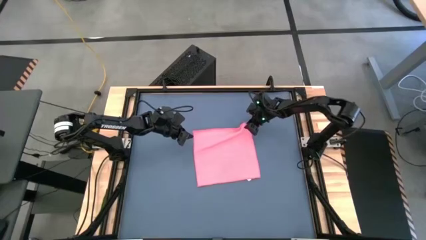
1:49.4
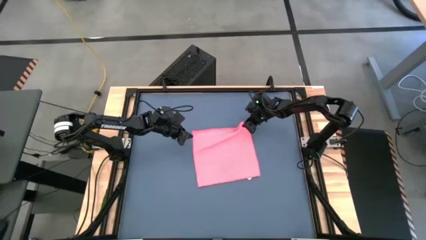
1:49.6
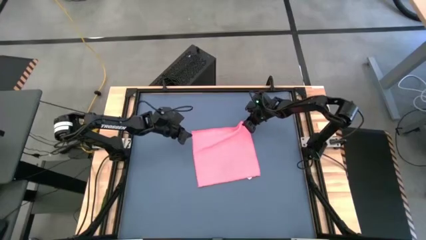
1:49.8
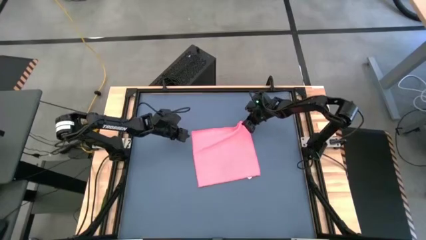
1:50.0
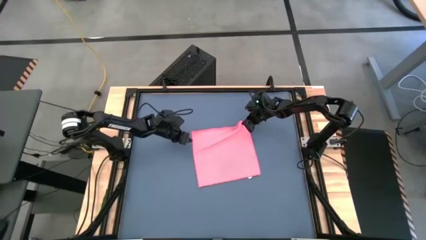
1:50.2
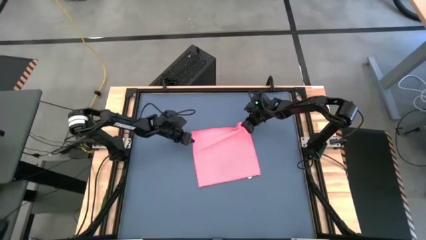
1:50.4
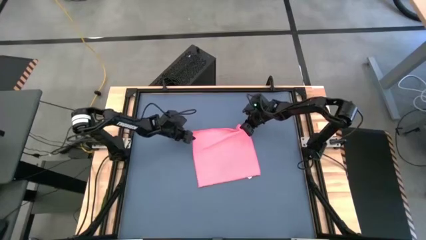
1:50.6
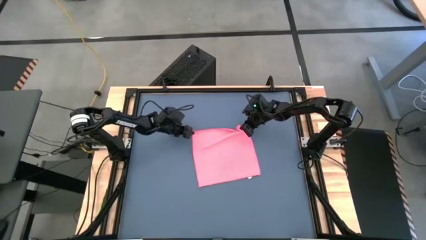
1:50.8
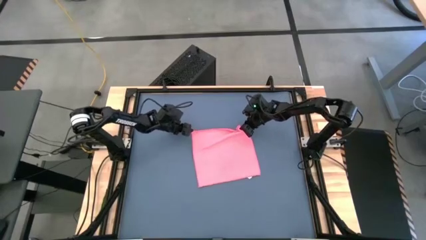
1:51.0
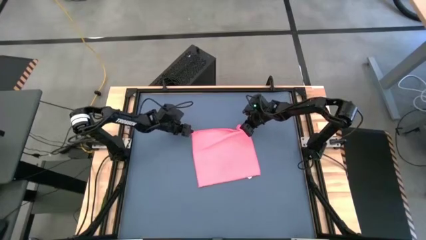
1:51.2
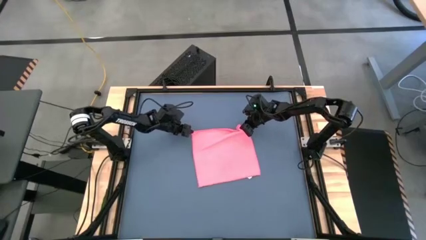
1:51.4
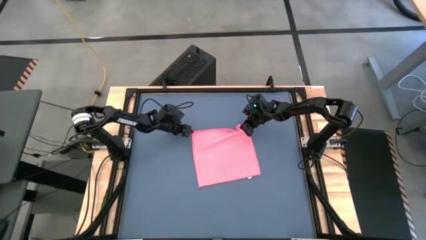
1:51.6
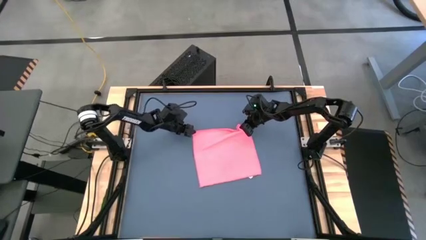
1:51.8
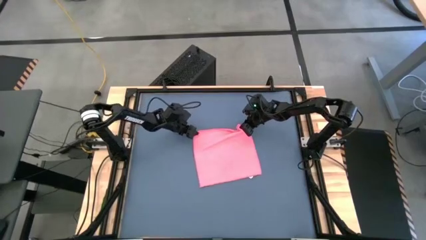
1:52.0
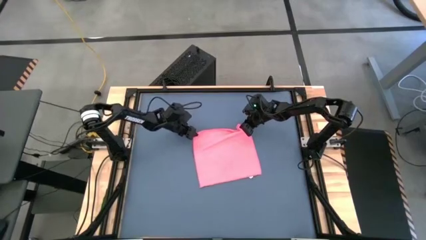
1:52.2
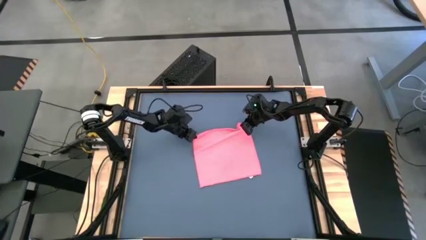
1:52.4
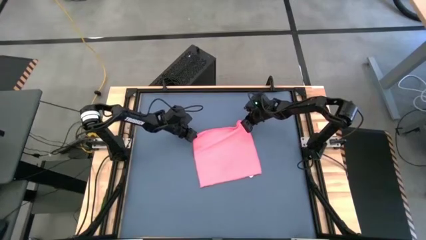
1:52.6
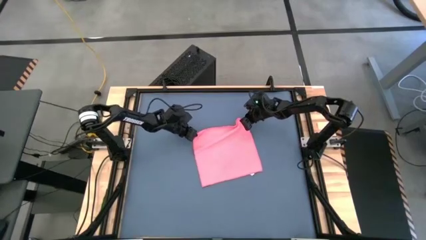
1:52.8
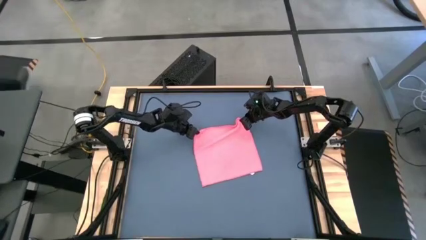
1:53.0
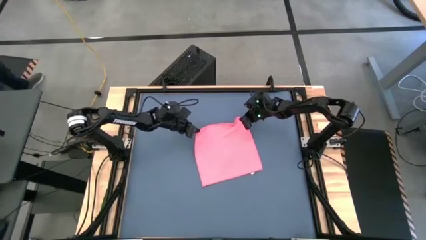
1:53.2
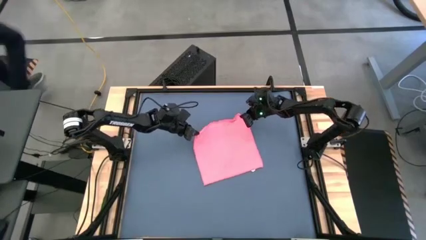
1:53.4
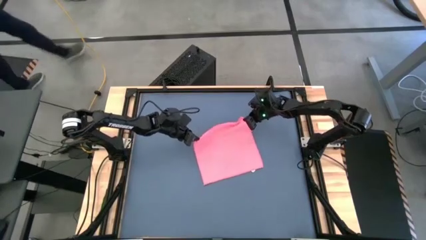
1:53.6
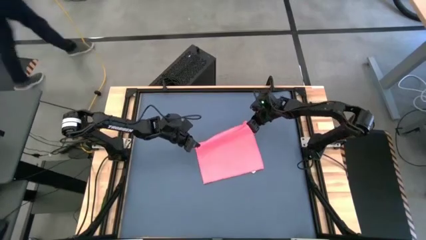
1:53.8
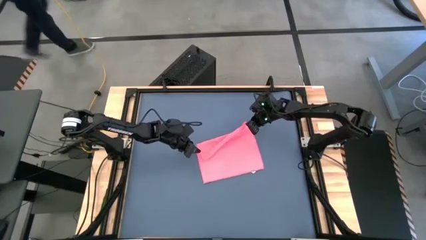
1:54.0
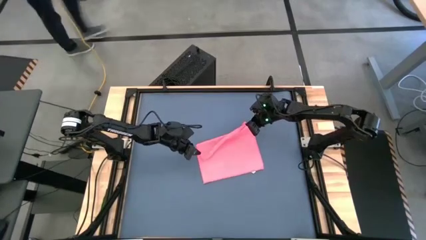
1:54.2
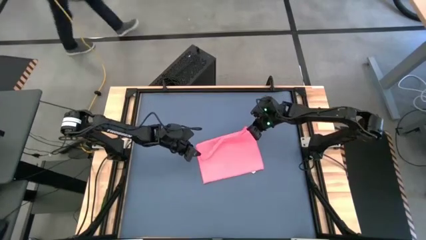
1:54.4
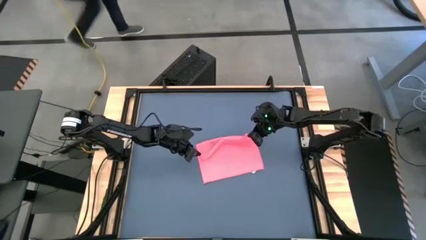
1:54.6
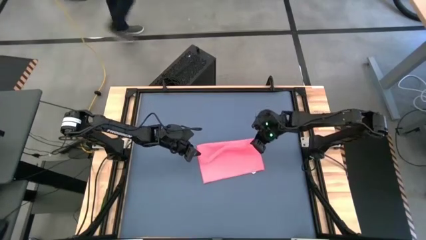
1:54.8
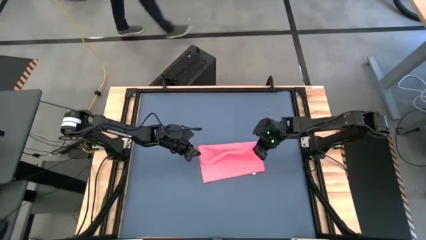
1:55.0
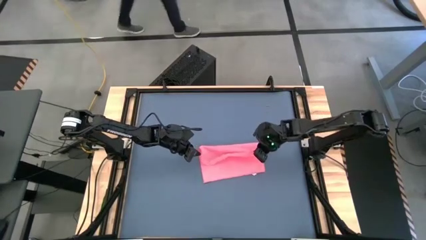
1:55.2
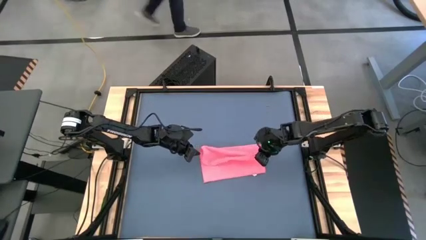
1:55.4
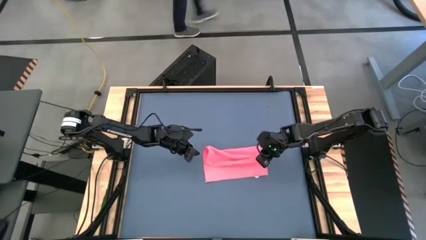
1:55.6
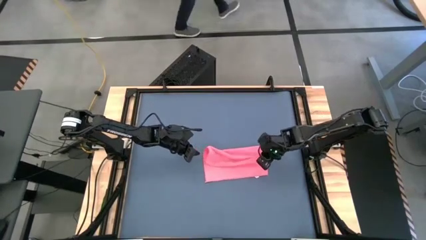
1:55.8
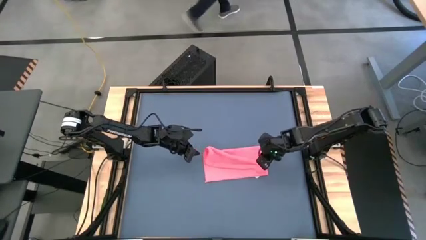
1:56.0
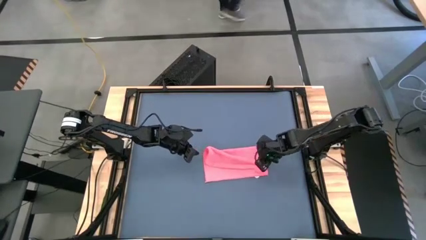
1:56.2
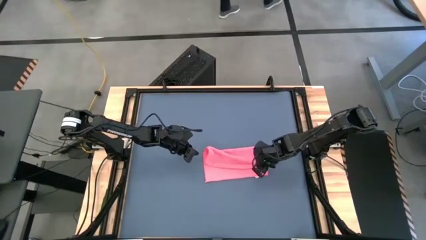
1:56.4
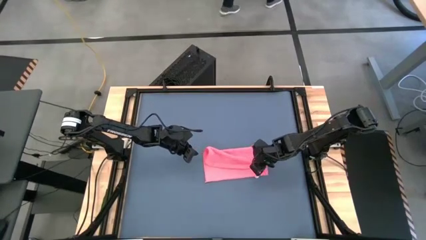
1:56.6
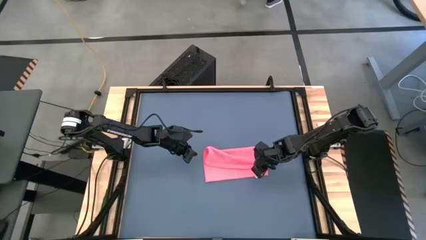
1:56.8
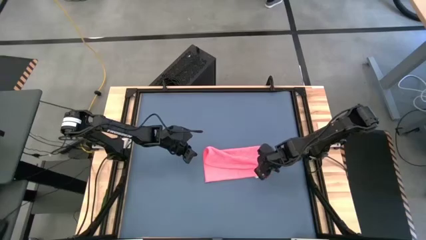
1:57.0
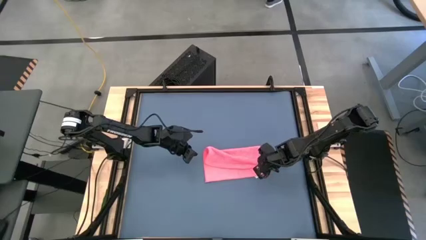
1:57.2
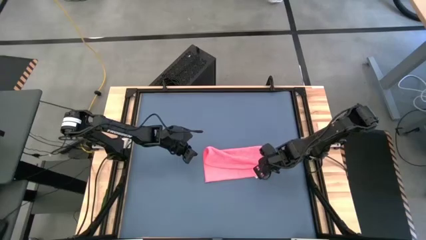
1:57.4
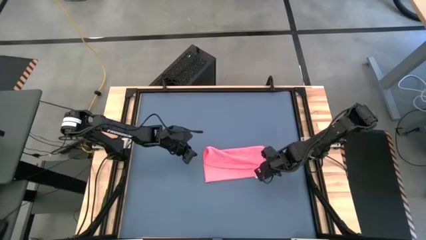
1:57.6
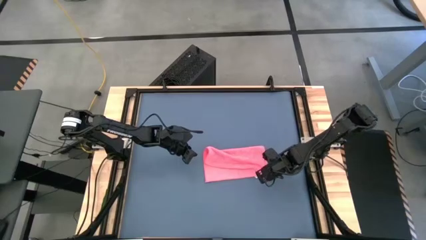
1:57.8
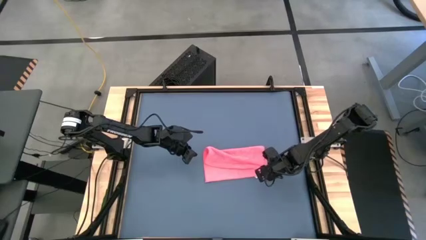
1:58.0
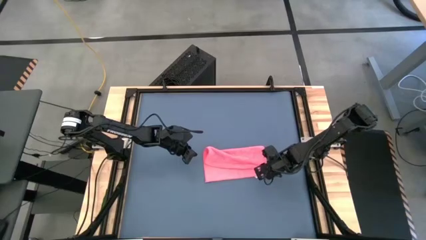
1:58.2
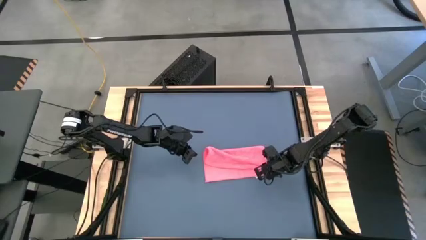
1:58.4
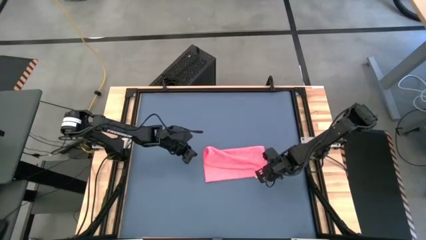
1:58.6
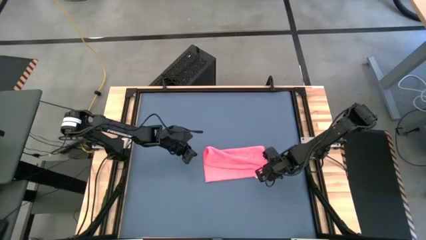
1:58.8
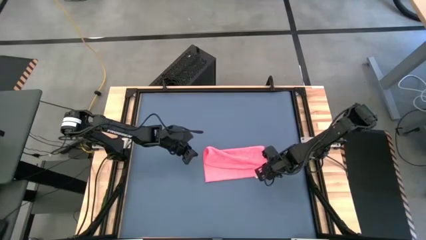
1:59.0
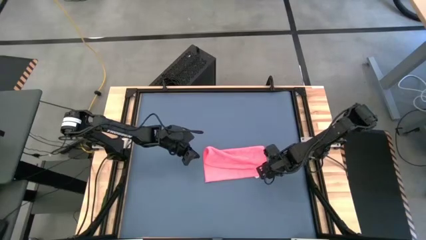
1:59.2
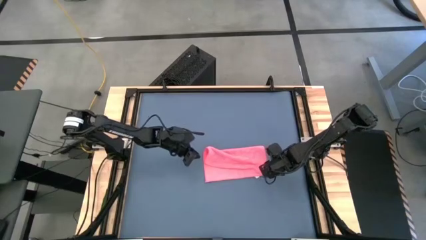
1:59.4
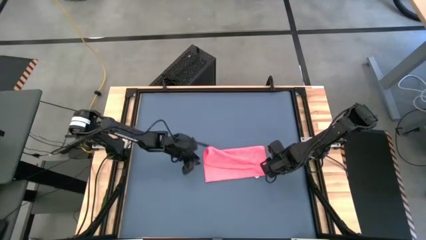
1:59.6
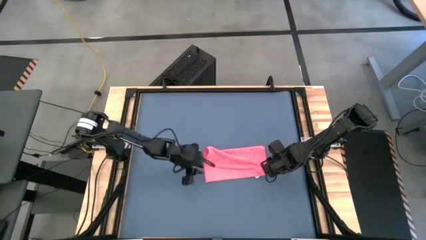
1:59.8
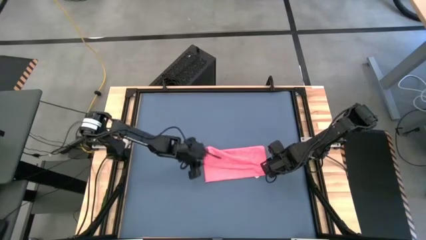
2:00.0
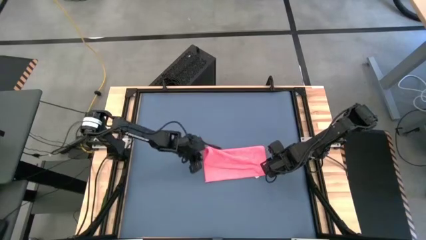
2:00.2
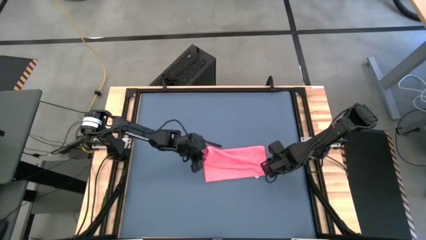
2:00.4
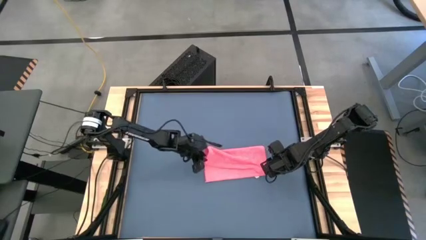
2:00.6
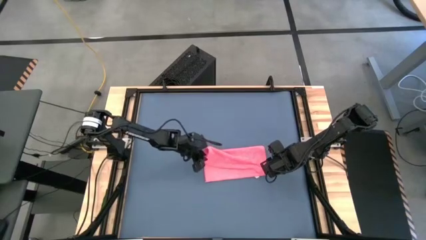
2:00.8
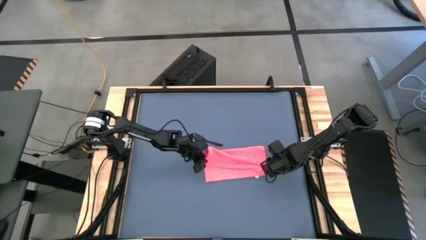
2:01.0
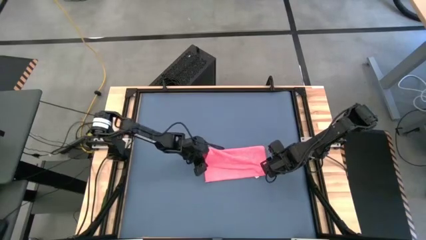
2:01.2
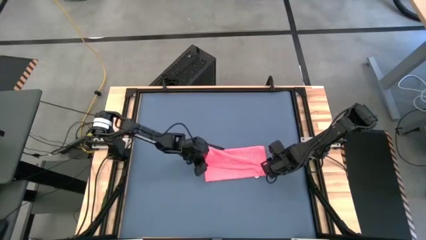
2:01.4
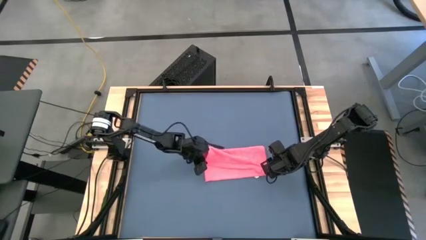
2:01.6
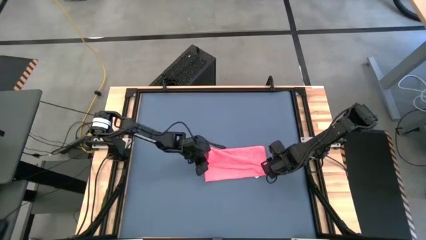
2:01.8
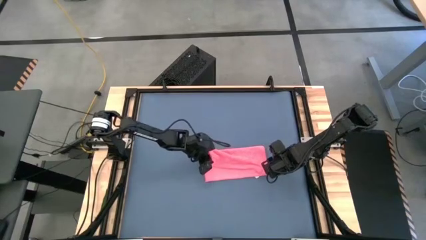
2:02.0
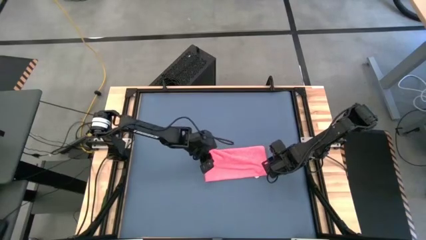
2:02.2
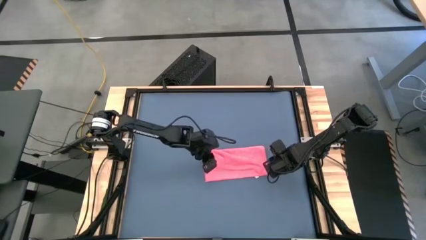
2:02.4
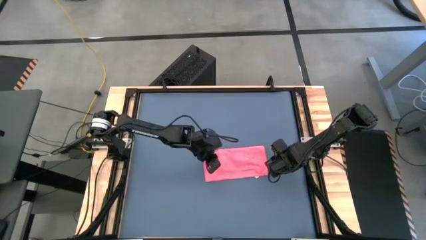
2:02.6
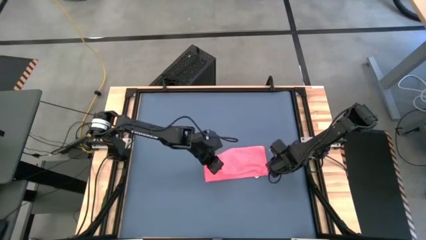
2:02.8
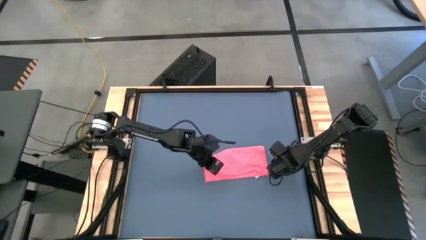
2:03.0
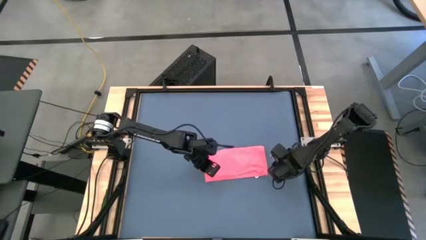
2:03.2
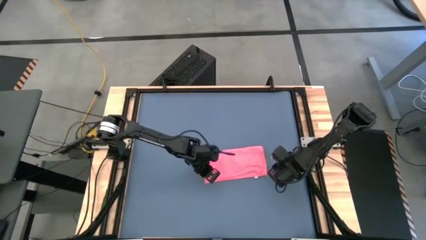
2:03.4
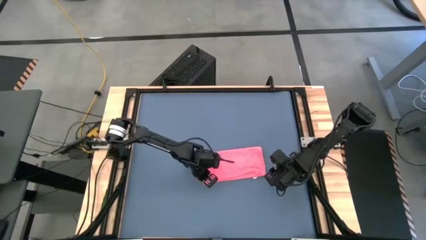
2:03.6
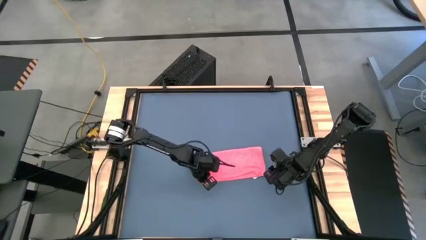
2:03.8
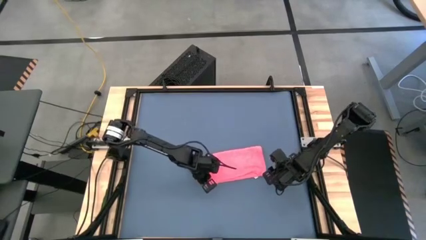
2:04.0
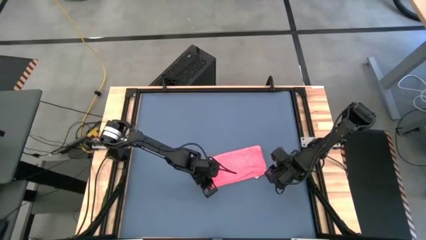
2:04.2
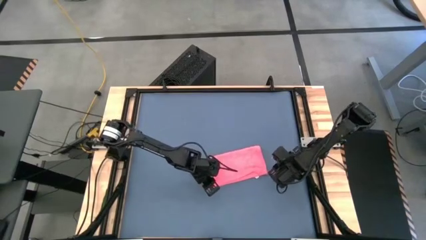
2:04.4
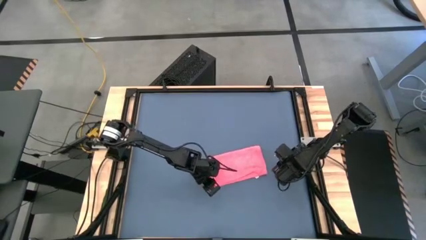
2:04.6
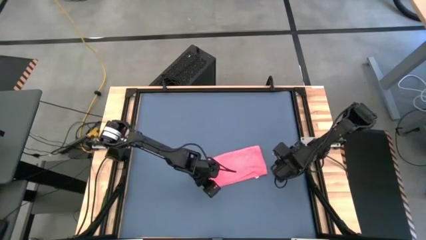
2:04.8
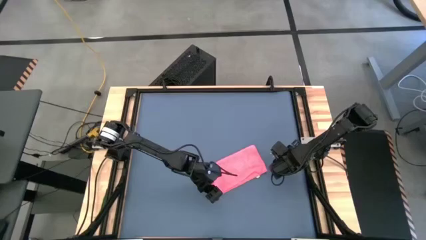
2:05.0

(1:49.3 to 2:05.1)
Task: Roll towel
Fold the pink towel
